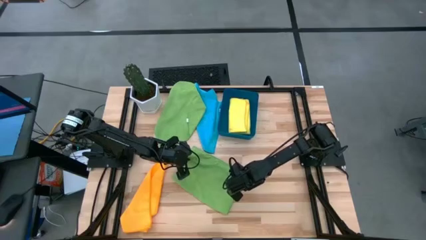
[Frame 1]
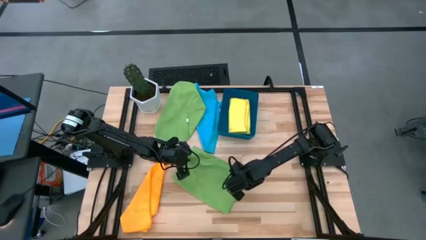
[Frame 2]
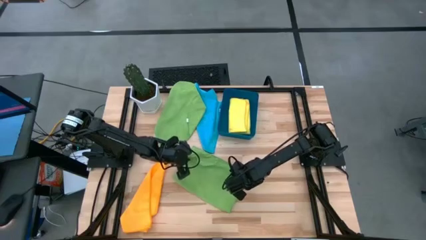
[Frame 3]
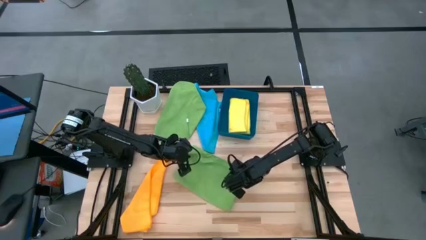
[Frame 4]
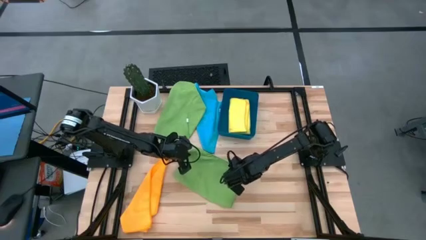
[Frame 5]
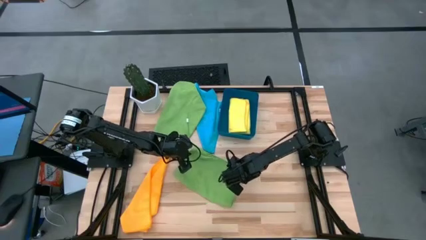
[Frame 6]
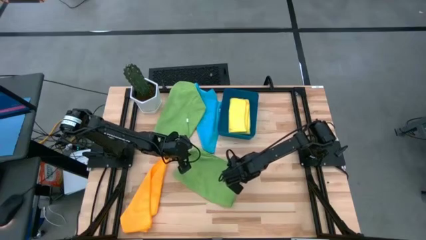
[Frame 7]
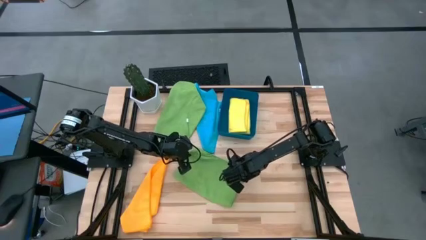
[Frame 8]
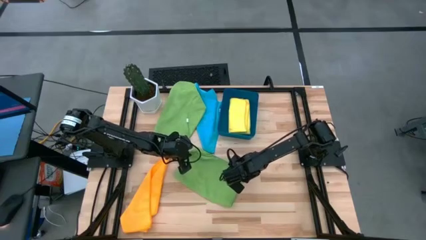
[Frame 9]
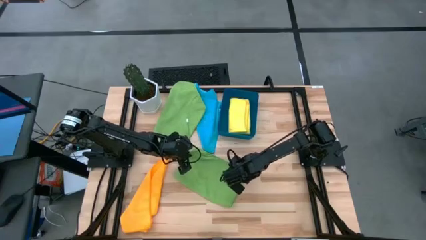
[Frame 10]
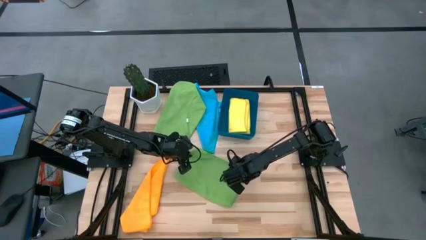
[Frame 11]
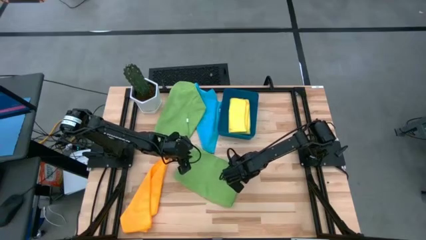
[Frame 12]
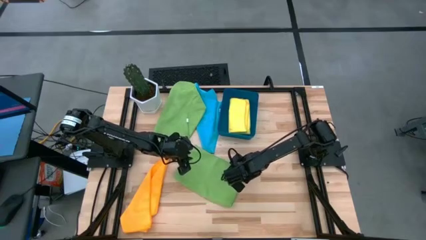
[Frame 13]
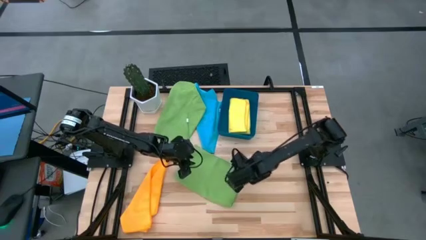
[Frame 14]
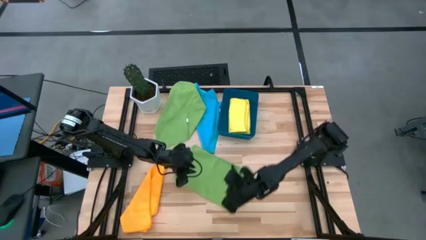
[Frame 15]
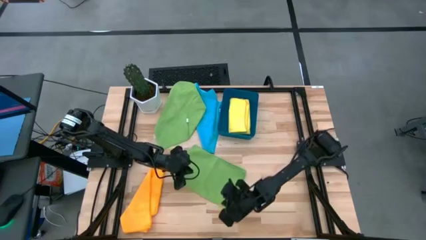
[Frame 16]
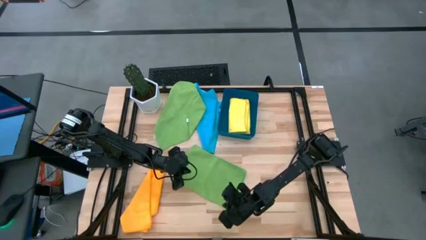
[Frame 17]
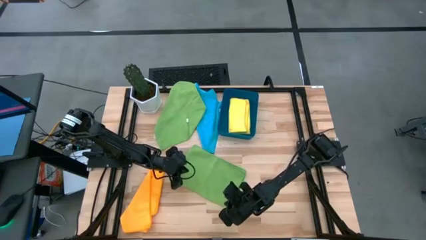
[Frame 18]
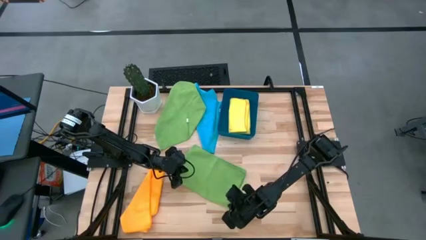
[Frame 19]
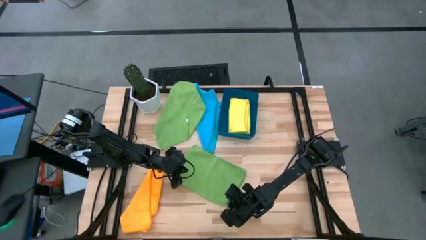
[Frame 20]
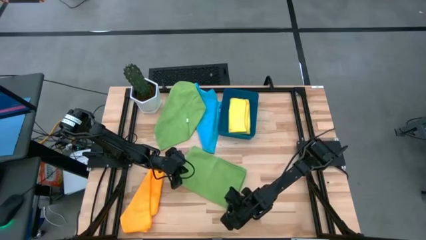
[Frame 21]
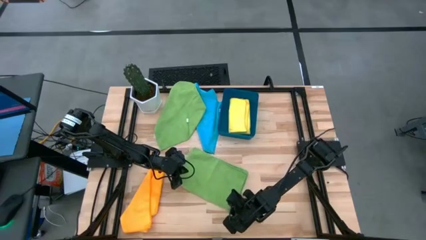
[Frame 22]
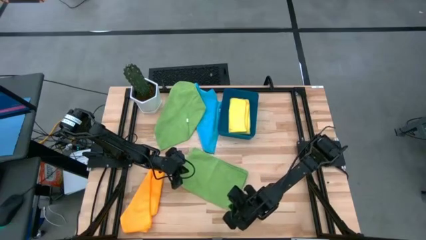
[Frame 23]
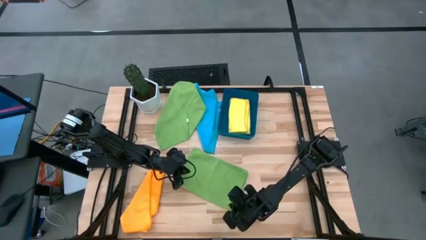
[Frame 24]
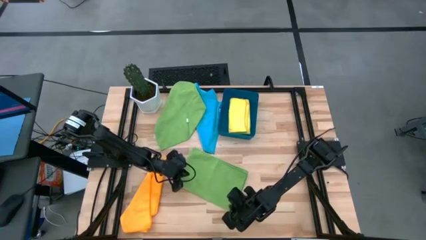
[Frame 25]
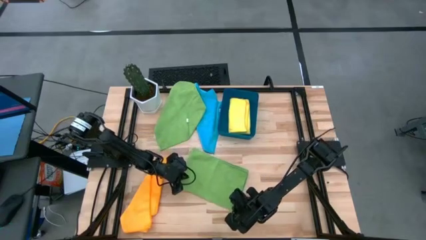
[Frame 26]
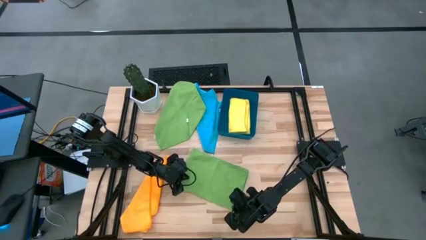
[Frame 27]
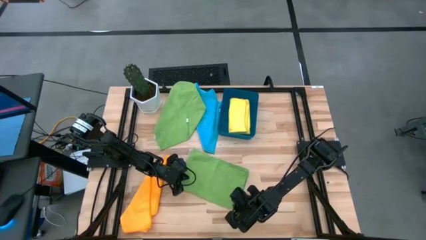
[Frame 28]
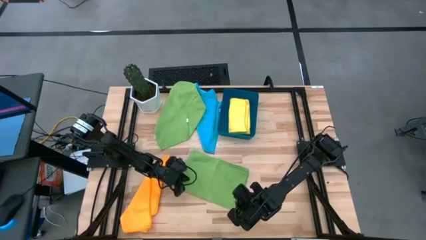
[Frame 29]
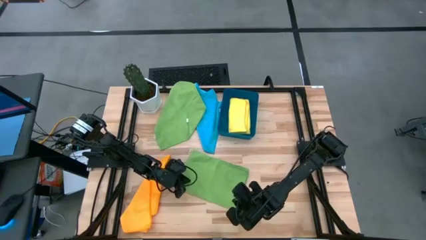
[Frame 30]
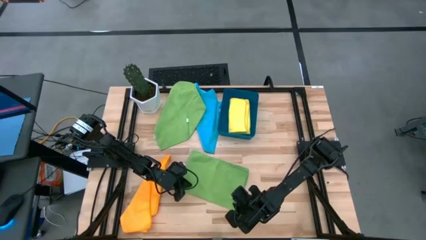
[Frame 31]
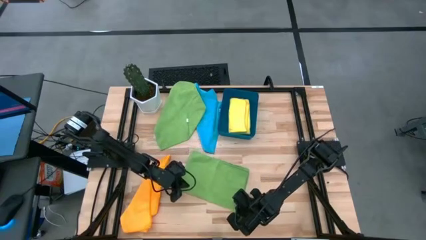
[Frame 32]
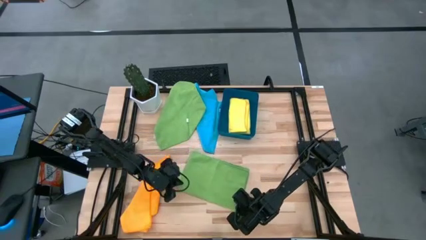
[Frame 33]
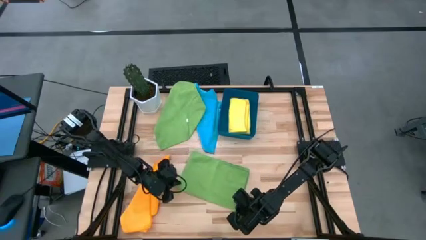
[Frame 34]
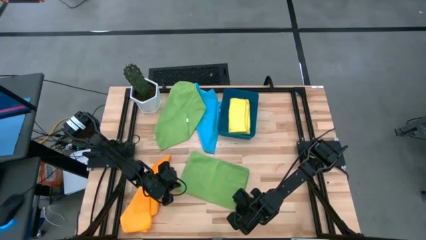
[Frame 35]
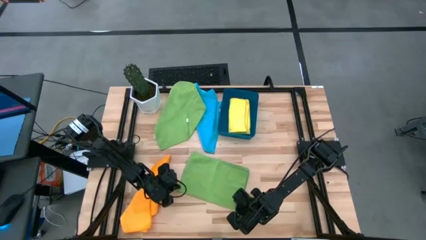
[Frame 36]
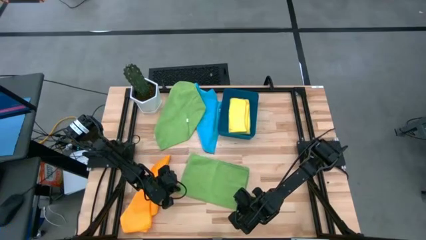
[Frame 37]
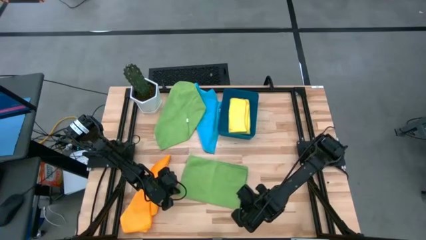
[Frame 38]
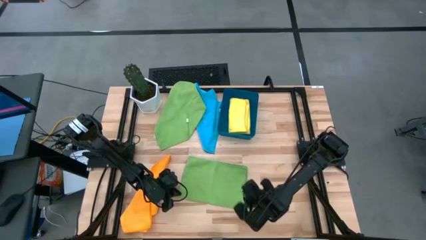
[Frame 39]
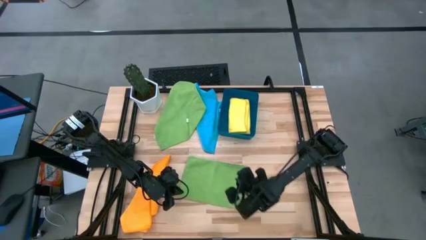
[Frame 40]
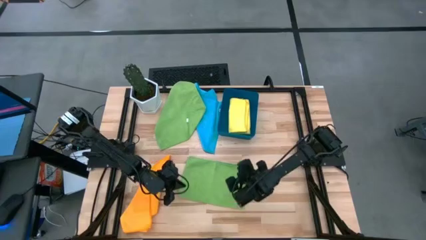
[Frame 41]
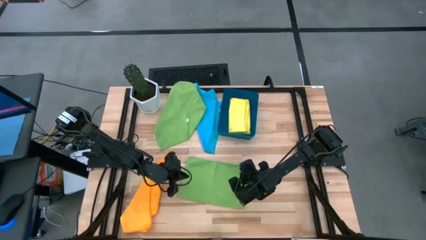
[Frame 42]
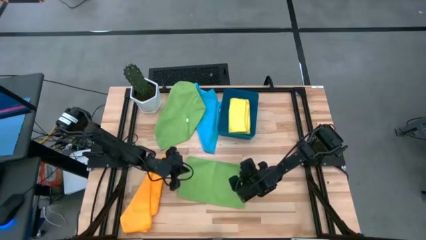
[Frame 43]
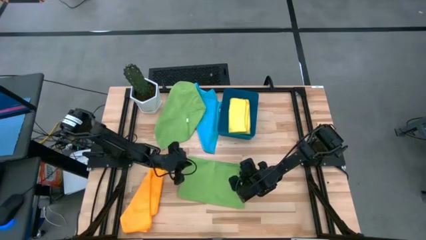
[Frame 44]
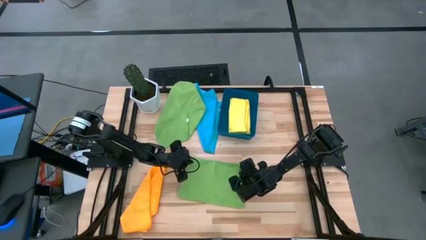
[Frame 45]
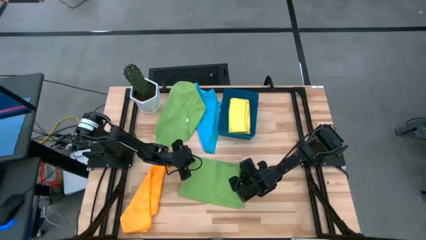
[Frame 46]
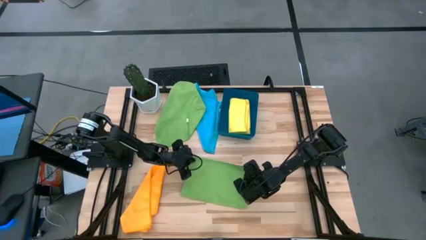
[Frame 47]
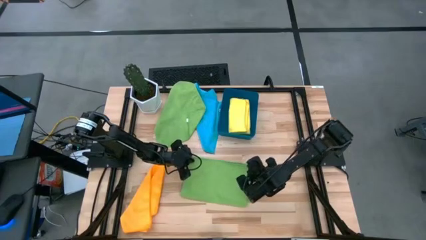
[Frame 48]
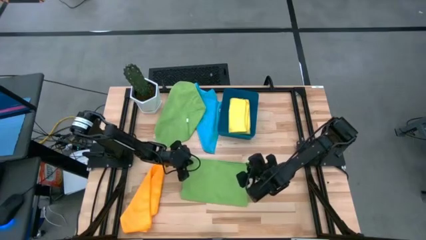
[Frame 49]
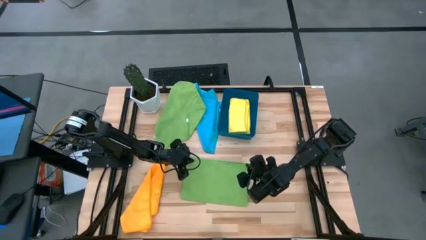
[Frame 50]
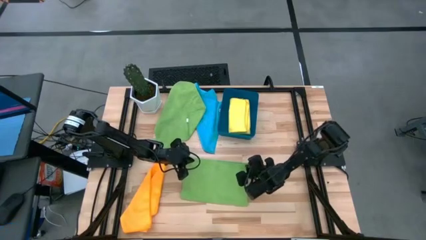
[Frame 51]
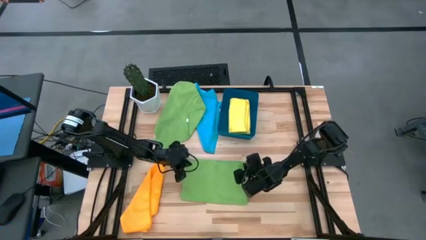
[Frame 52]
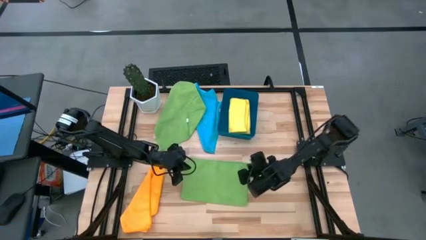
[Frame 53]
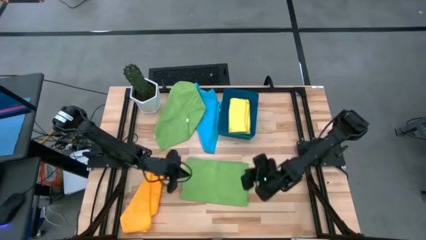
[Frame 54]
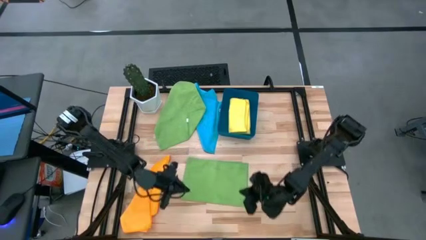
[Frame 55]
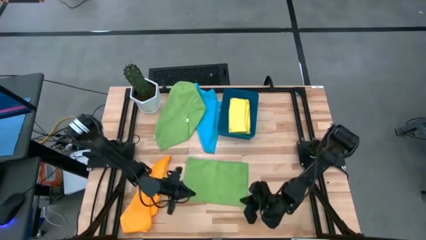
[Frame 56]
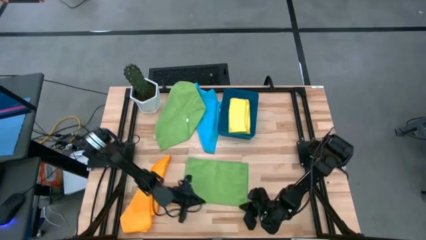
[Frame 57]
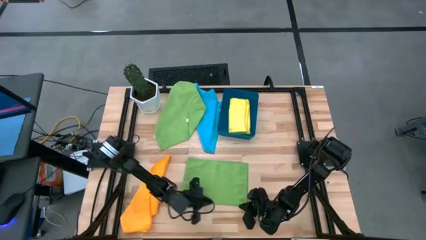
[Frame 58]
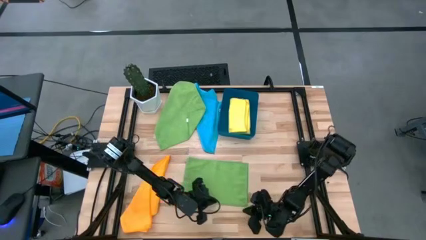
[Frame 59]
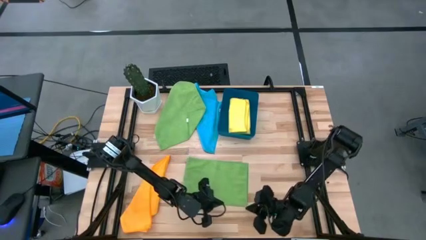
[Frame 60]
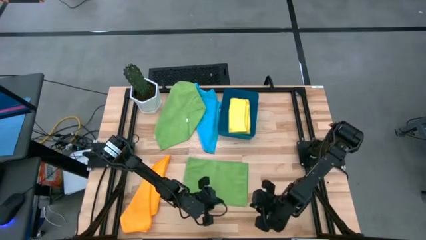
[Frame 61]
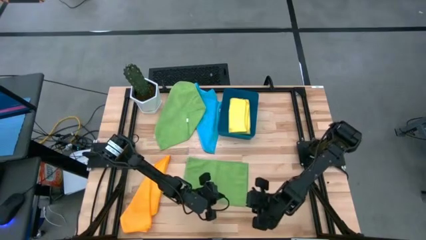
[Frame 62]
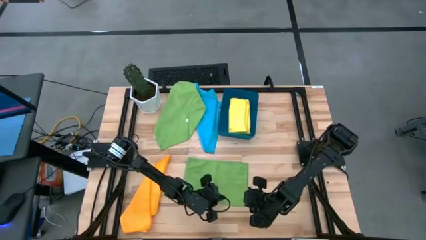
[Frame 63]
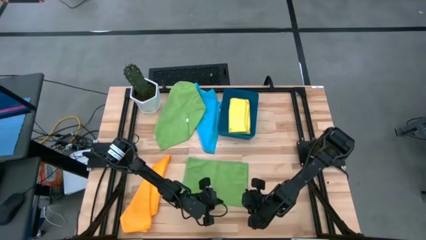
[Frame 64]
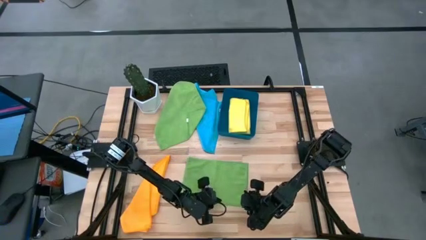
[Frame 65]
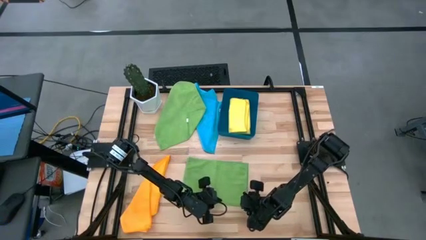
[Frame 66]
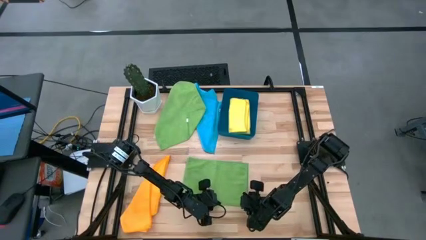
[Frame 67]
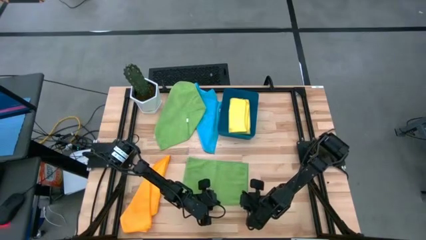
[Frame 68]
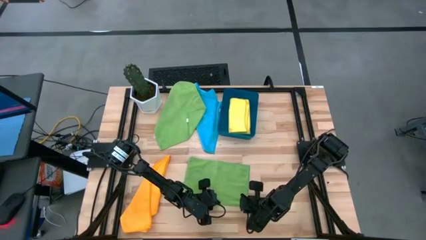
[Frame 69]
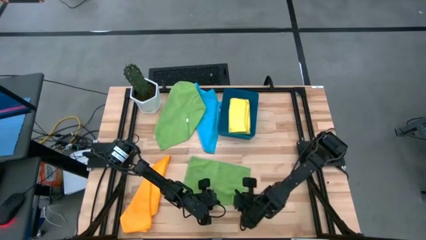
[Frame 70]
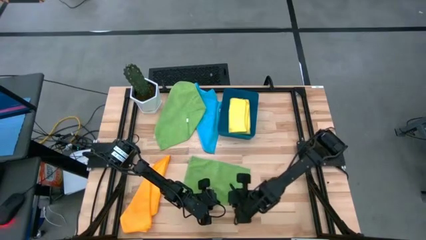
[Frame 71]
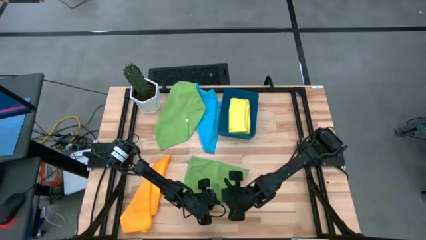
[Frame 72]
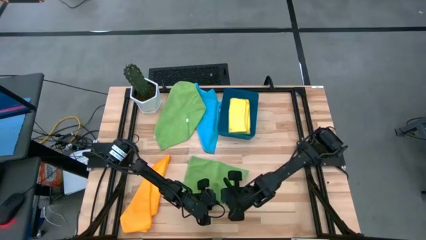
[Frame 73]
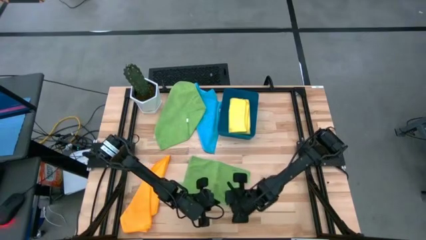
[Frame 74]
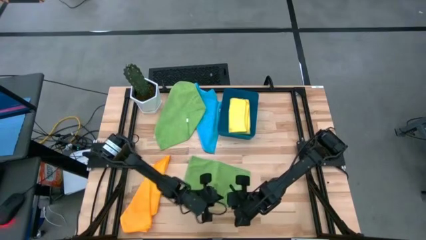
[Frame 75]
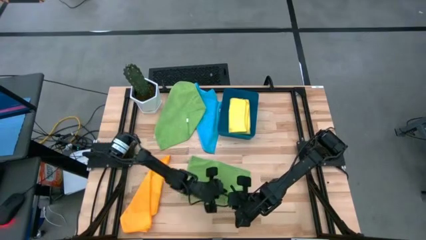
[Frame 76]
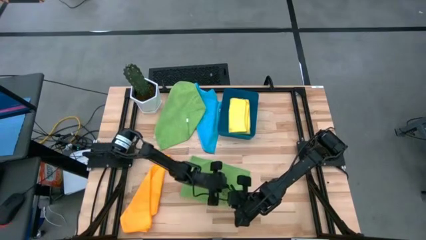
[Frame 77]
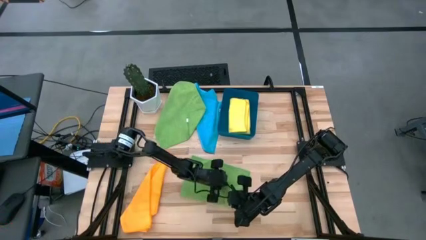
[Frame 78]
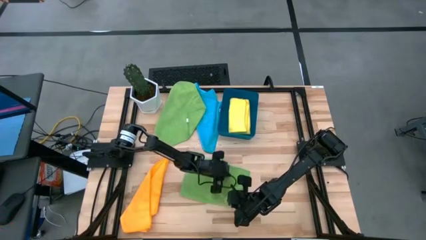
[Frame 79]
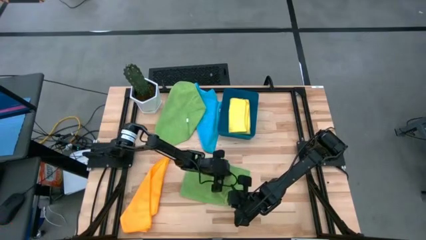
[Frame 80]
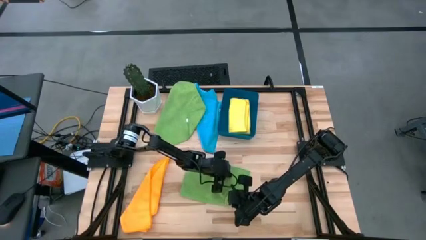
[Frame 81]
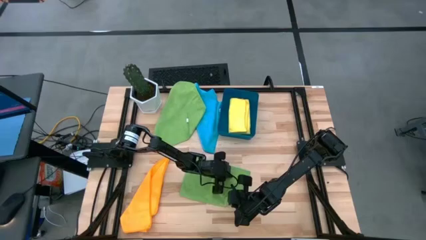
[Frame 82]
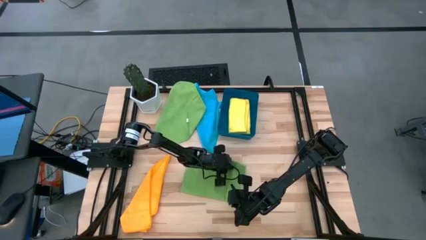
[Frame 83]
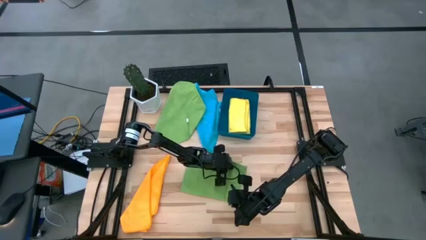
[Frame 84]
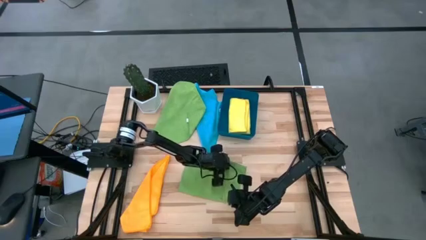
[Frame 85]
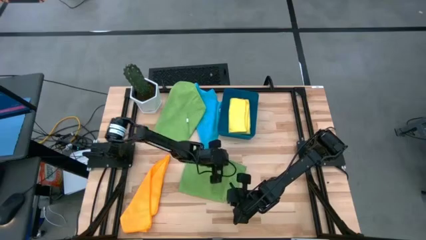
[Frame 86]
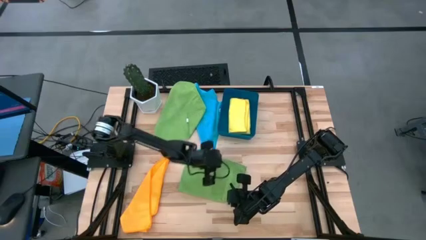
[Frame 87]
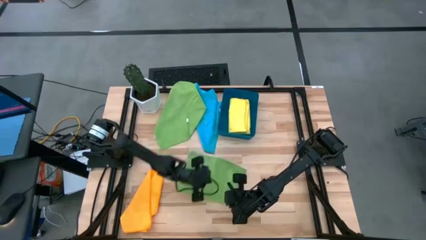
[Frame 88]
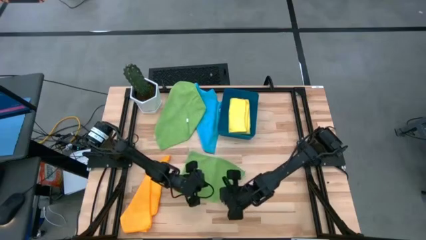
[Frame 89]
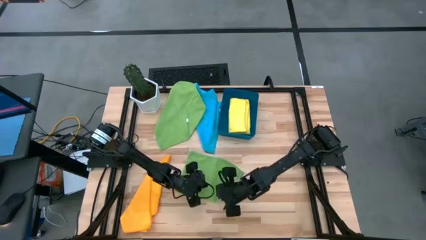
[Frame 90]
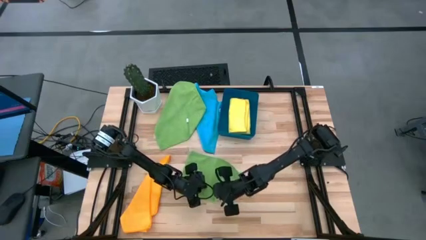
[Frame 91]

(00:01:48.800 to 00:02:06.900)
Task: Fold microfiber towels
Fold the right green towel
